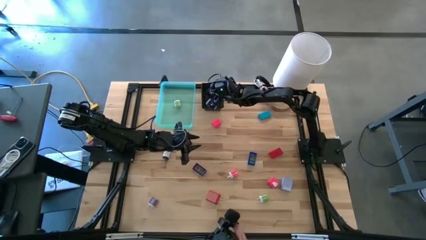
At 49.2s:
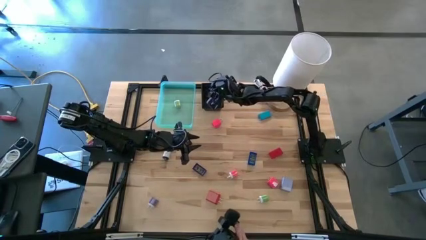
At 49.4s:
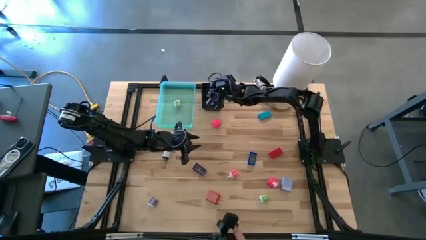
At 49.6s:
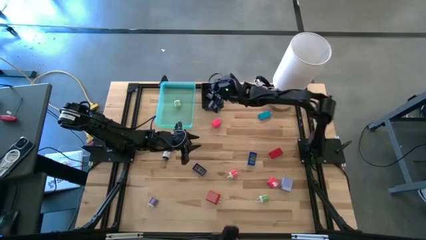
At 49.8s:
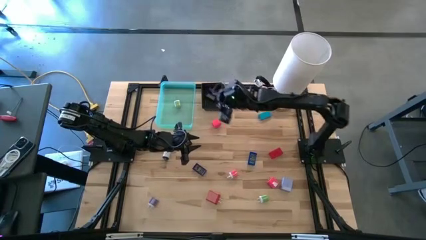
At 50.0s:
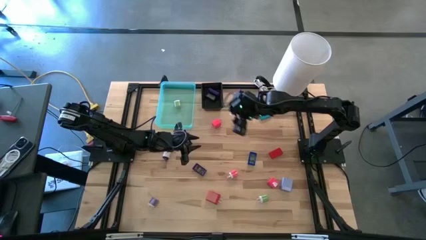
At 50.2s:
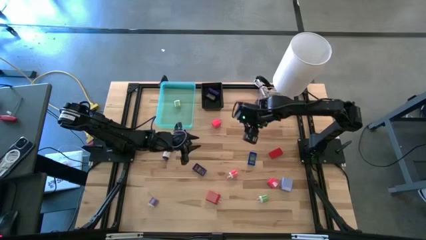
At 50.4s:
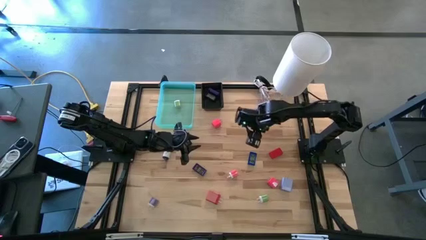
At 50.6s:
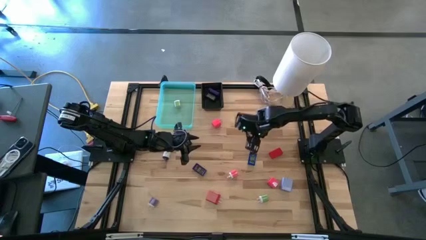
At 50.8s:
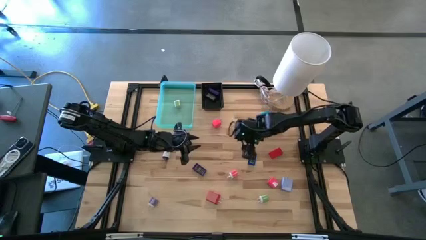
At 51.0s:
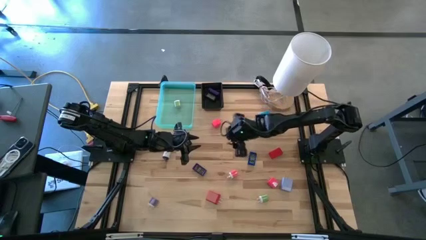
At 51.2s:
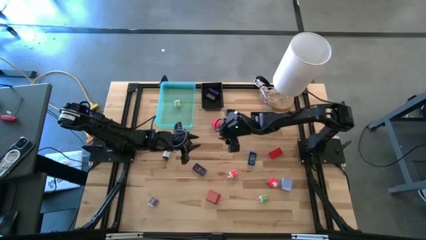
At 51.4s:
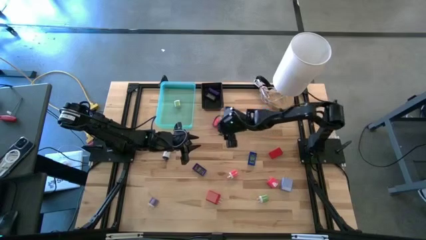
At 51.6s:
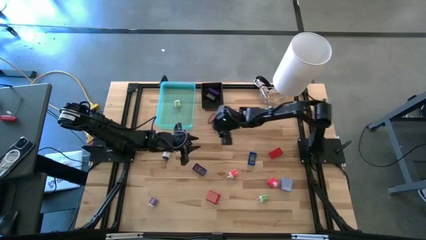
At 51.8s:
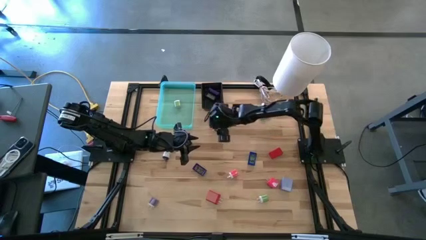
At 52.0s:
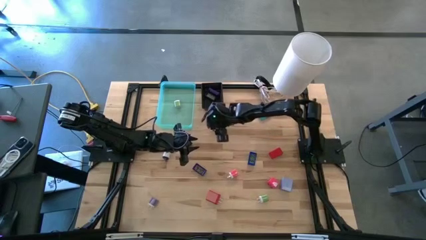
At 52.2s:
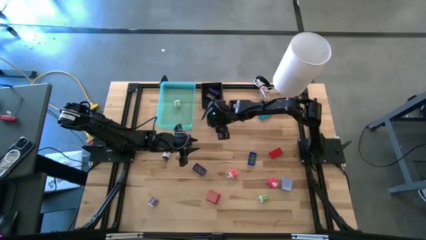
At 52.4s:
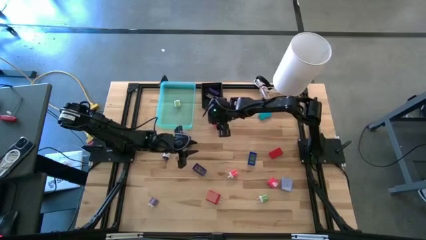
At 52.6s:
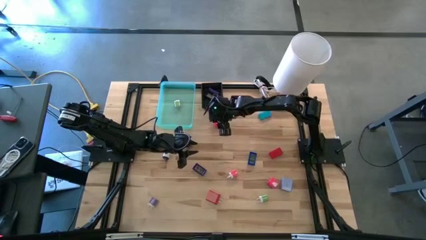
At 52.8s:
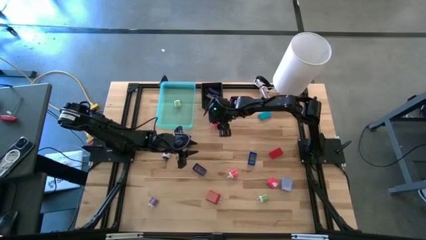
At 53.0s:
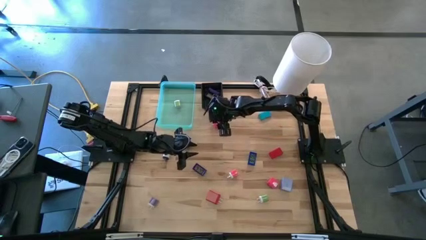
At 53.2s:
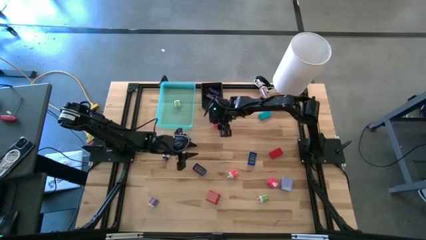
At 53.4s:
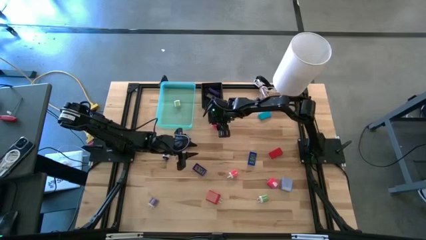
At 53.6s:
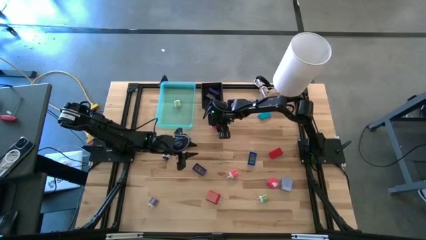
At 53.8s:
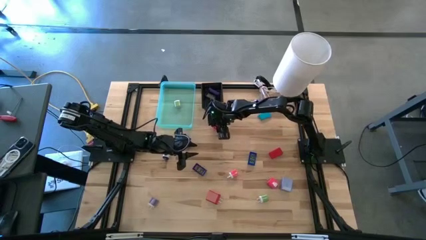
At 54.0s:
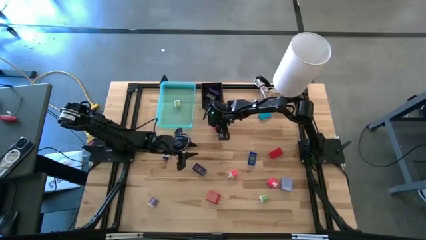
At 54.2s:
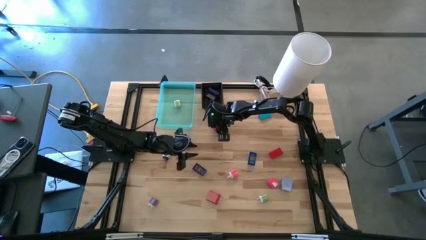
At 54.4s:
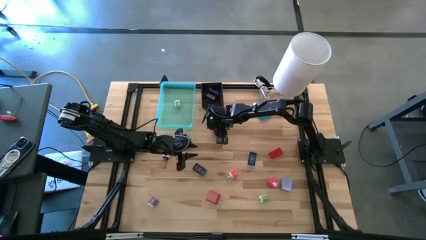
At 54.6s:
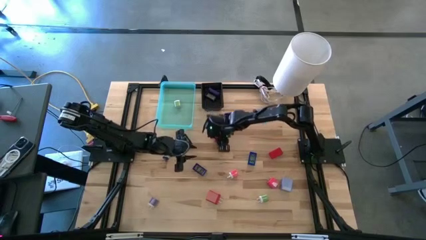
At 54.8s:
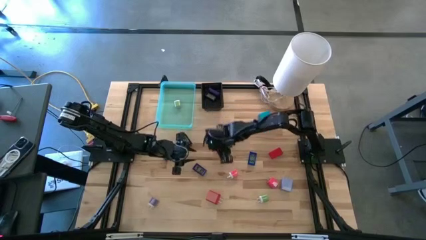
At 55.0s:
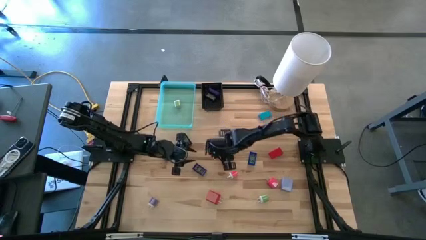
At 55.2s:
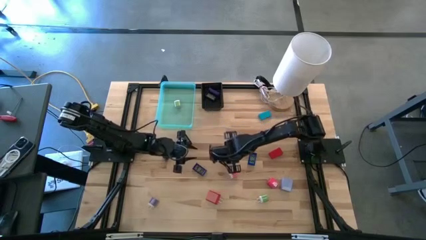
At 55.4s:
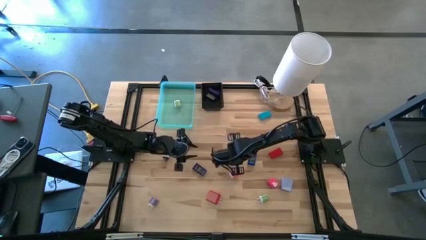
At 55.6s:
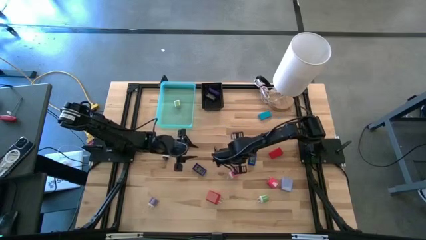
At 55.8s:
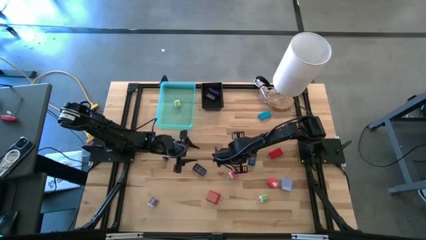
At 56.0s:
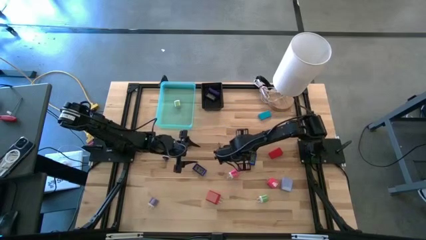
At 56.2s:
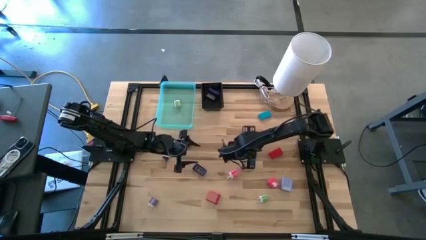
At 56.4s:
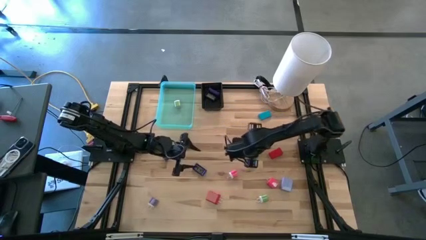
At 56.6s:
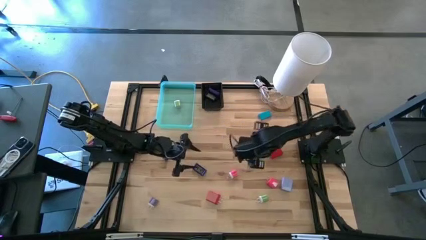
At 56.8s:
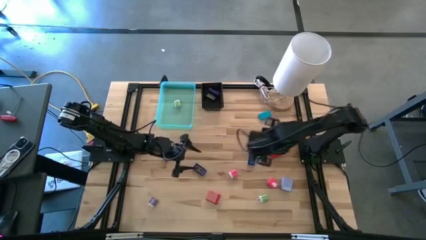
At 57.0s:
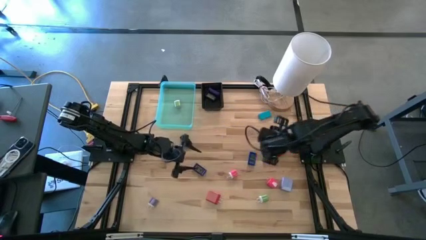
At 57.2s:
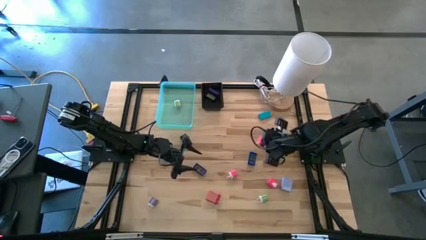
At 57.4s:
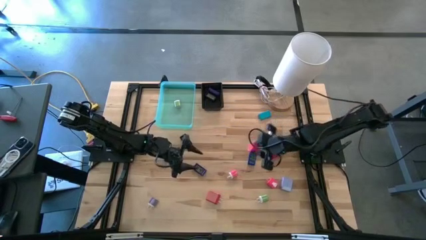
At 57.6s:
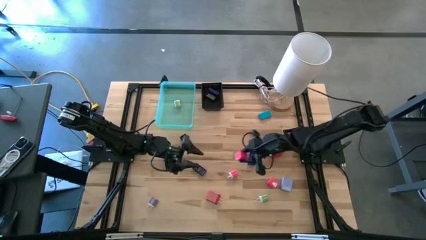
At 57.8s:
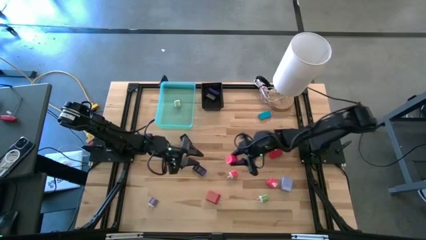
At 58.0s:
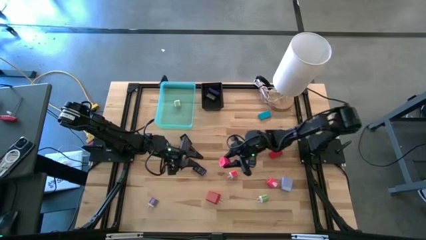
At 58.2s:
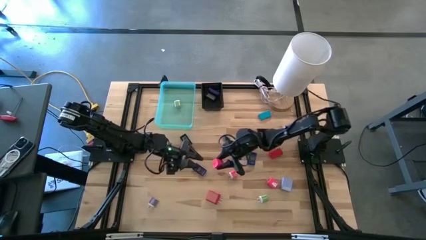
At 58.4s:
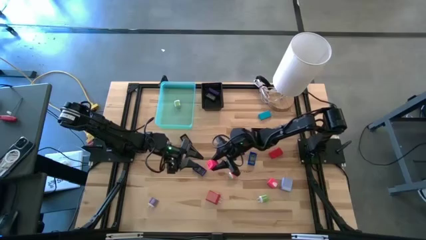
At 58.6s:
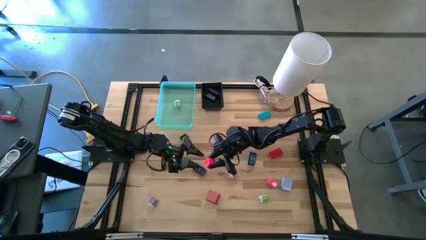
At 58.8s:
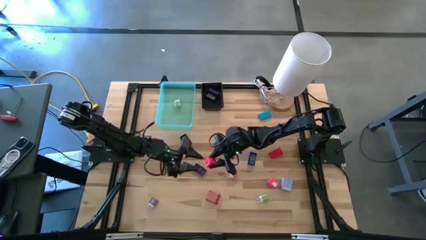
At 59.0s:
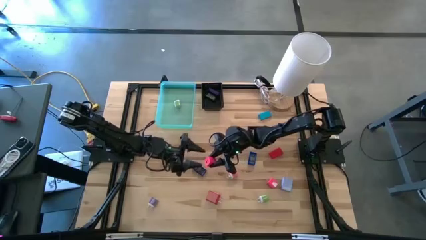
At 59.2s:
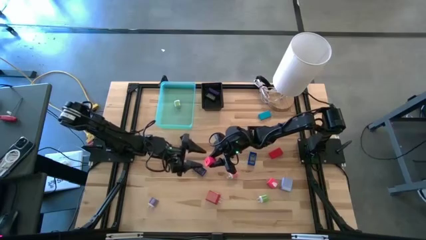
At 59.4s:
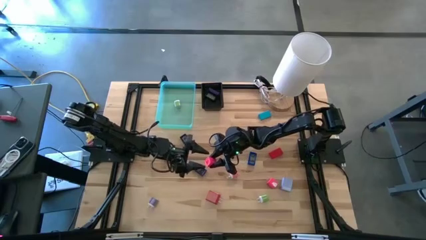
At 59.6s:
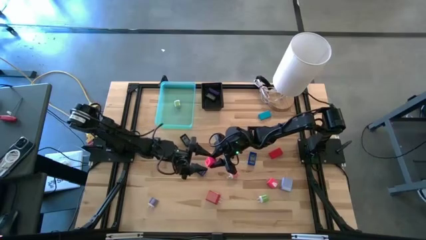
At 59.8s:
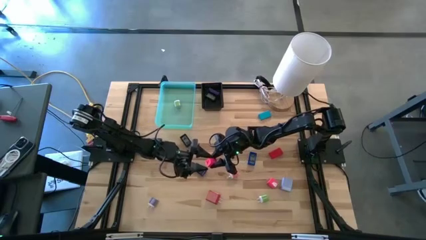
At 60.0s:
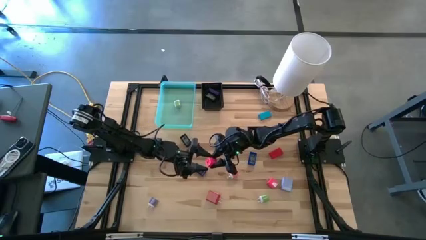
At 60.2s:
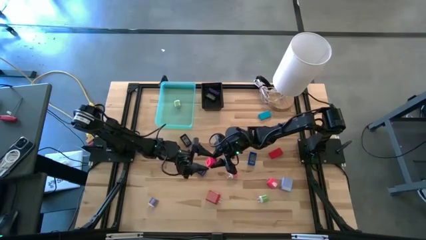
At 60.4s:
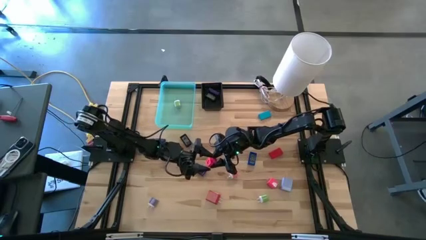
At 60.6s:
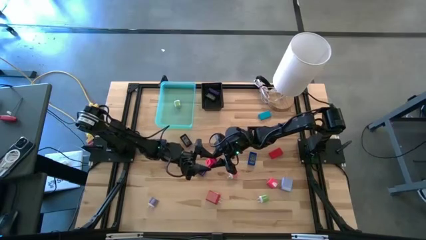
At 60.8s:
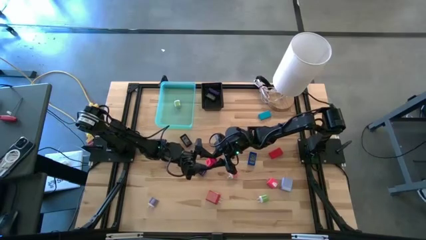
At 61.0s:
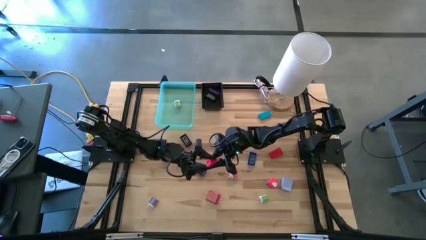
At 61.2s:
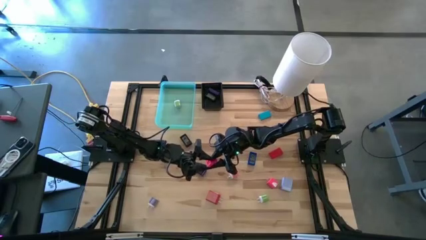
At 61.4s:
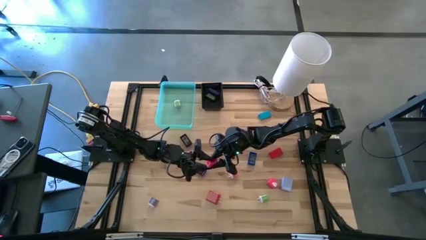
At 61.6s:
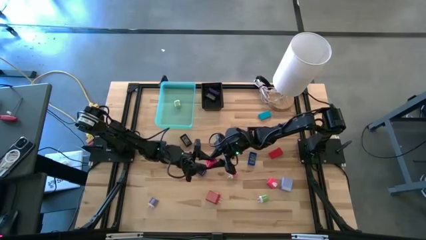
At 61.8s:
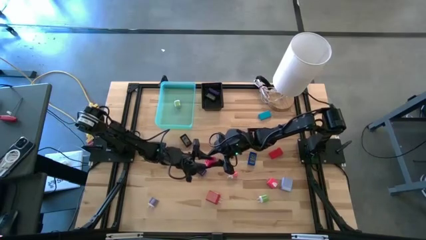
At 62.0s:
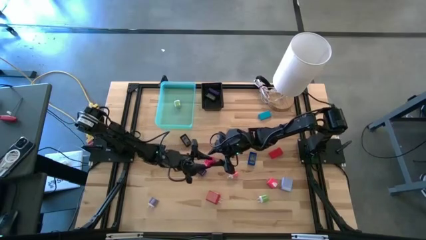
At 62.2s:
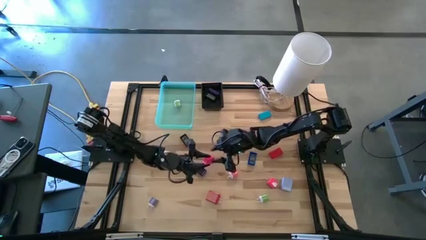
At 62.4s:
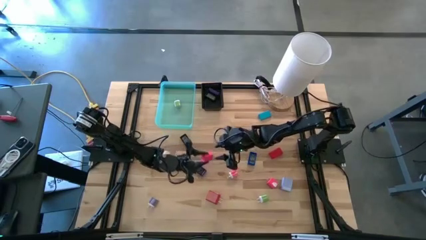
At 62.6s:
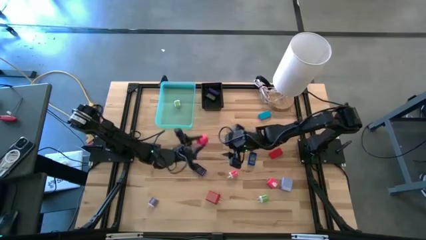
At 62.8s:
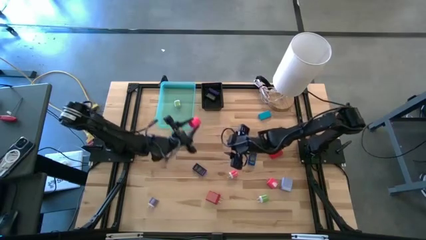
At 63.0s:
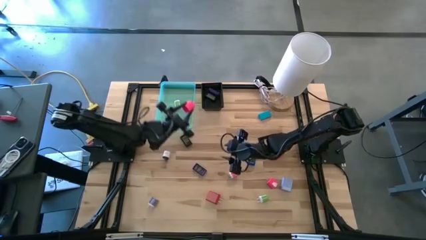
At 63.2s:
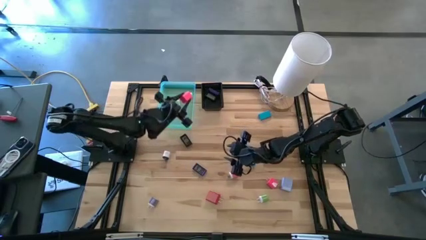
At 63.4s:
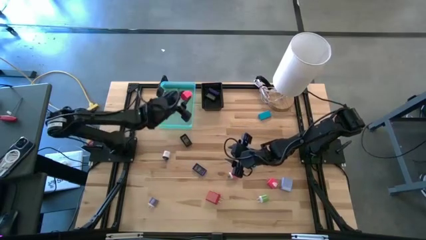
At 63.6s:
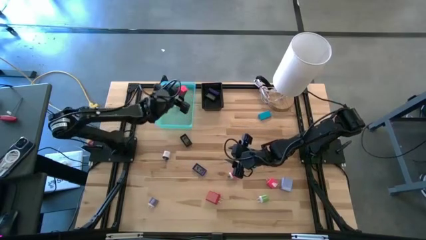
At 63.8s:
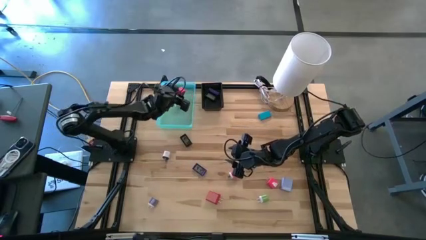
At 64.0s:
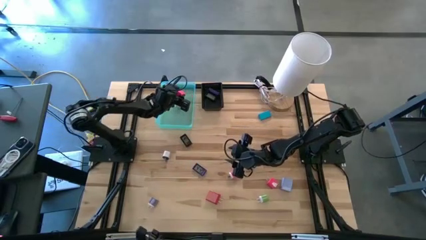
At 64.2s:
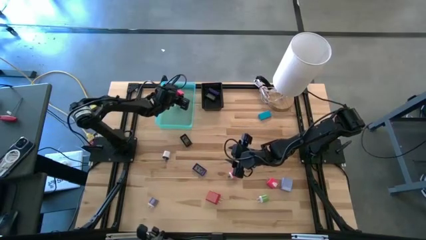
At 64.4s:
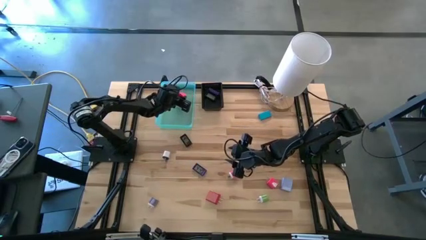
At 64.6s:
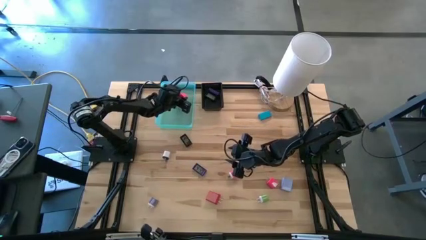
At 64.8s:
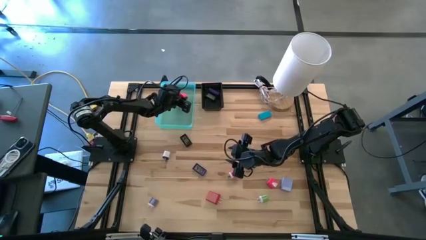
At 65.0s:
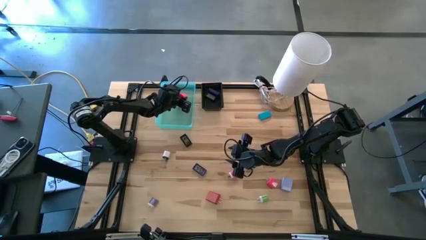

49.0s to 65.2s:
Task: Pick & Place Office items
Put the top pink charger adapter into the green bin
